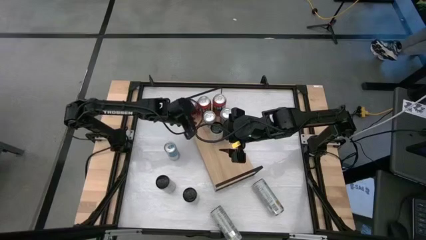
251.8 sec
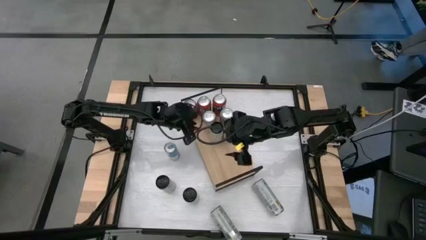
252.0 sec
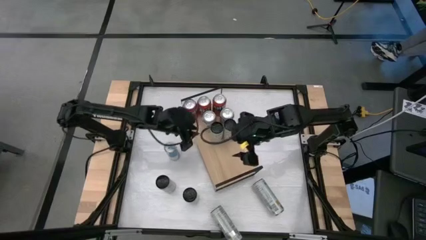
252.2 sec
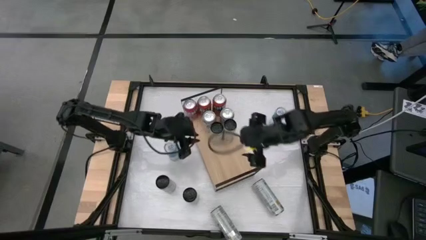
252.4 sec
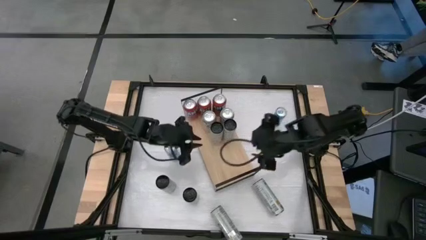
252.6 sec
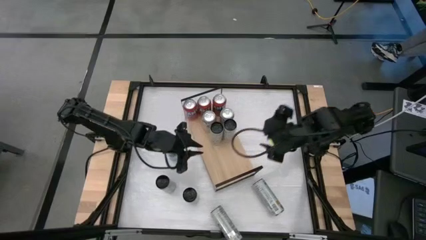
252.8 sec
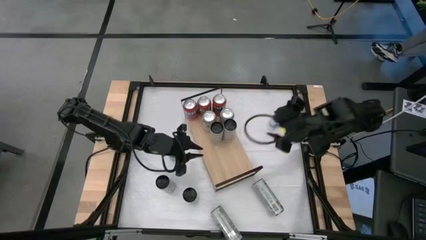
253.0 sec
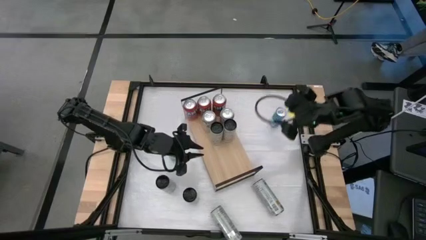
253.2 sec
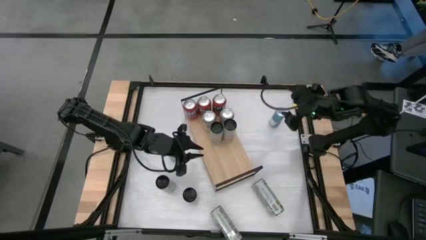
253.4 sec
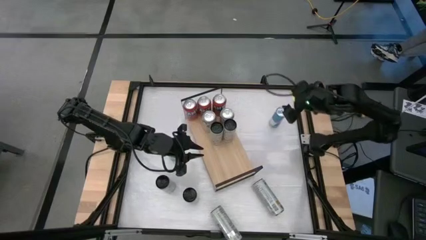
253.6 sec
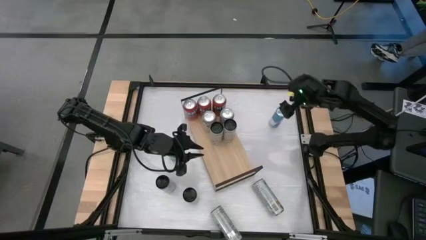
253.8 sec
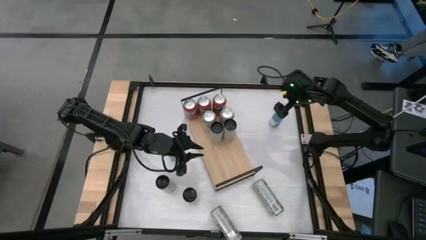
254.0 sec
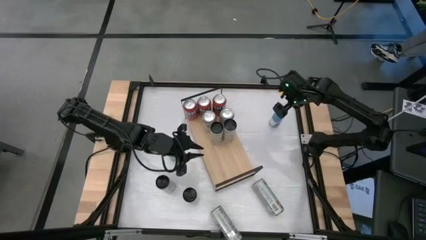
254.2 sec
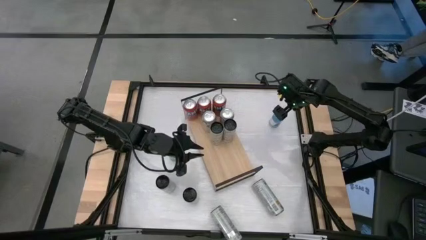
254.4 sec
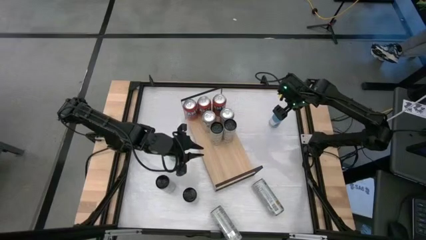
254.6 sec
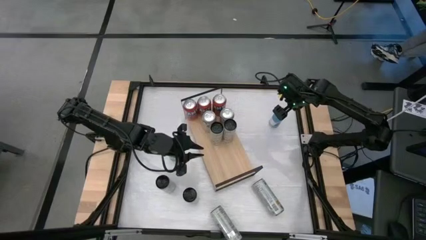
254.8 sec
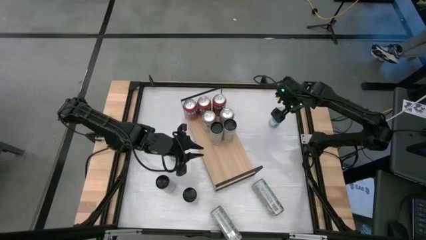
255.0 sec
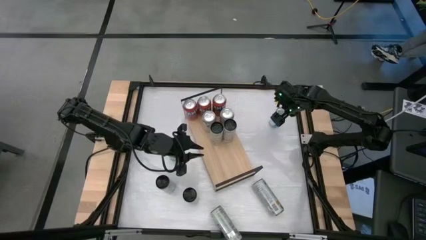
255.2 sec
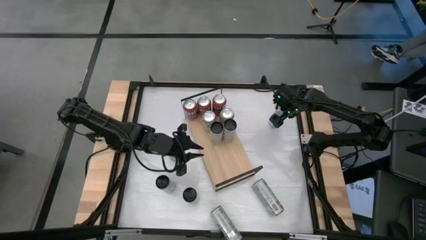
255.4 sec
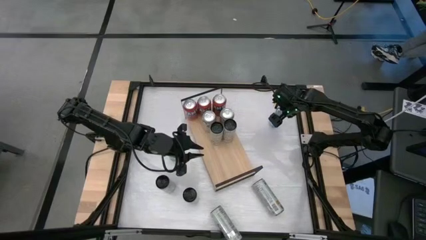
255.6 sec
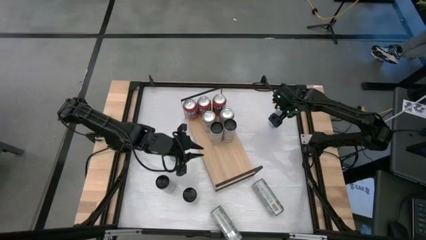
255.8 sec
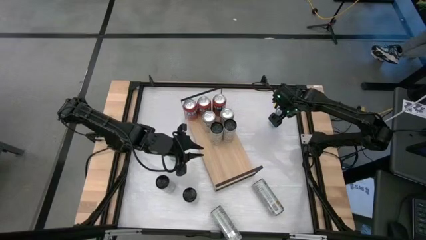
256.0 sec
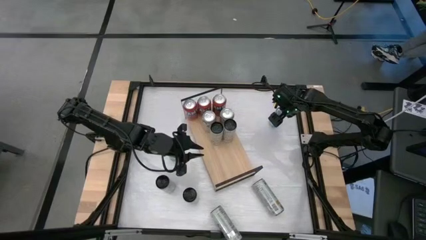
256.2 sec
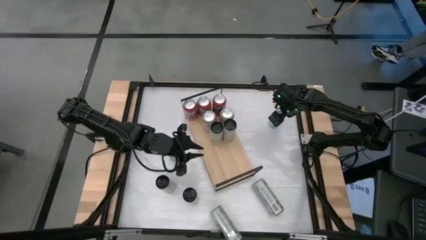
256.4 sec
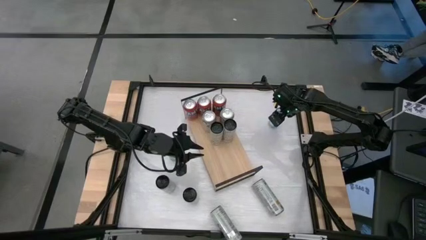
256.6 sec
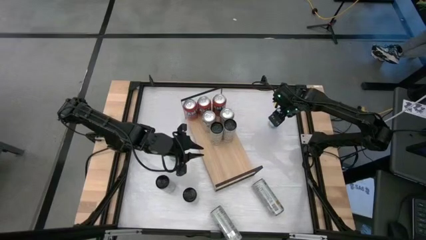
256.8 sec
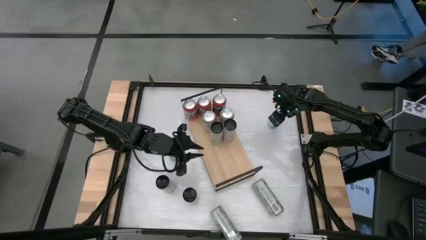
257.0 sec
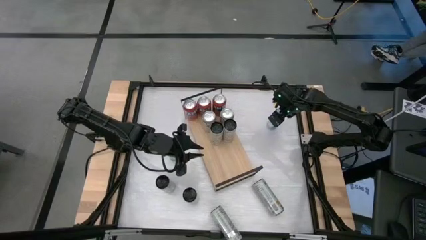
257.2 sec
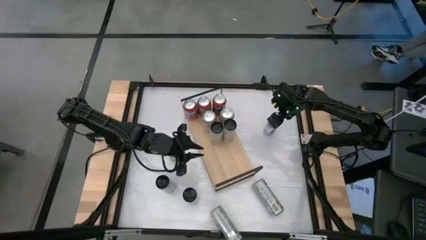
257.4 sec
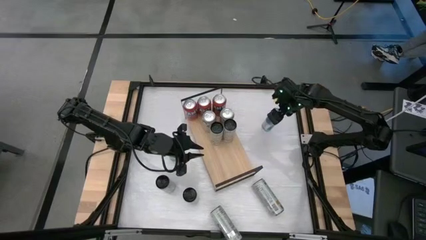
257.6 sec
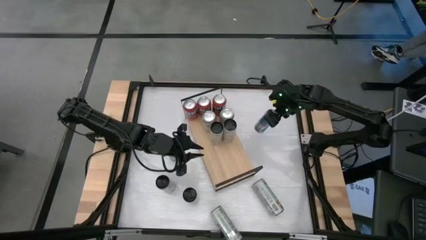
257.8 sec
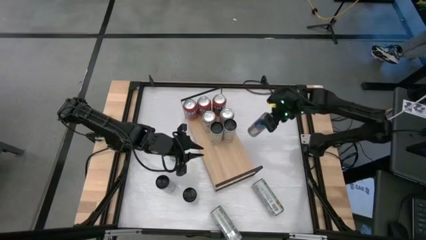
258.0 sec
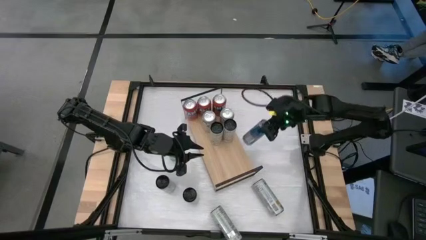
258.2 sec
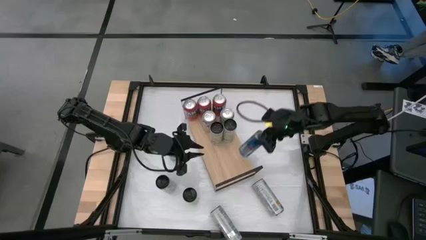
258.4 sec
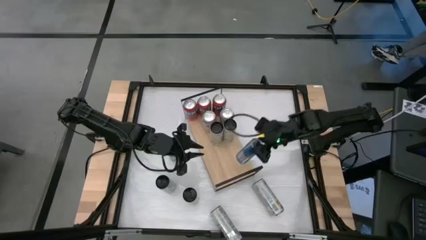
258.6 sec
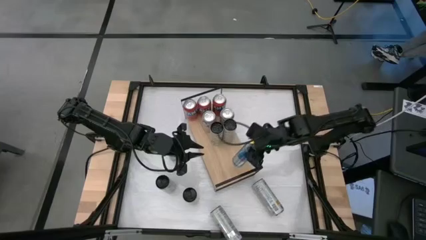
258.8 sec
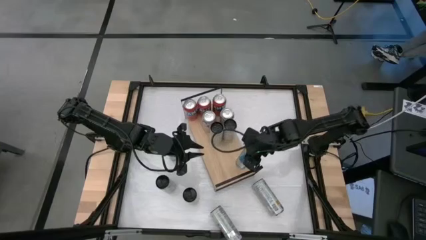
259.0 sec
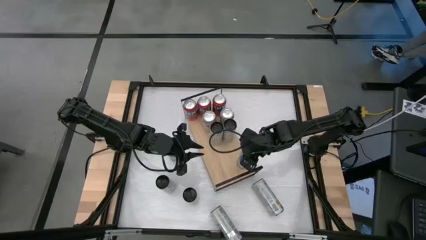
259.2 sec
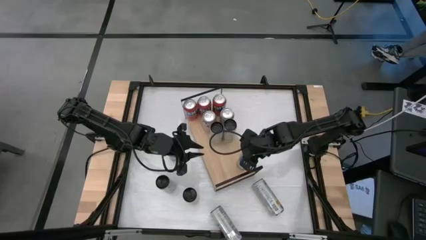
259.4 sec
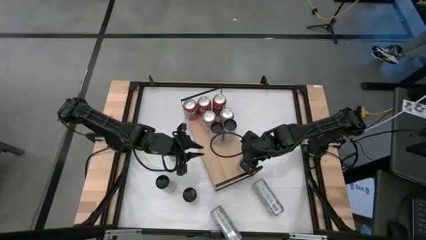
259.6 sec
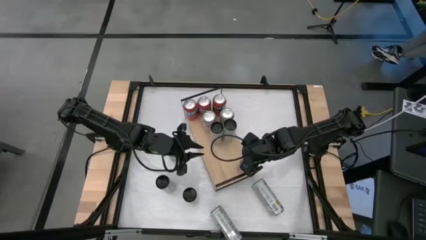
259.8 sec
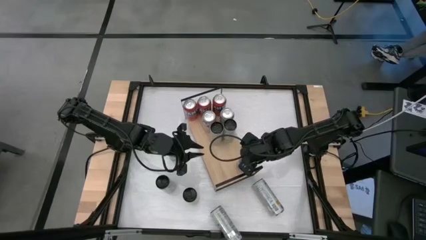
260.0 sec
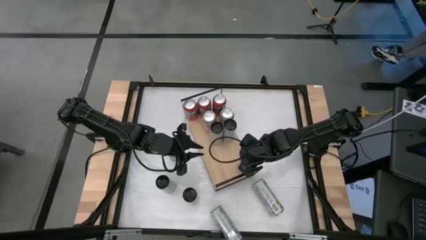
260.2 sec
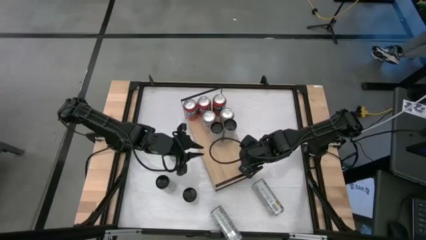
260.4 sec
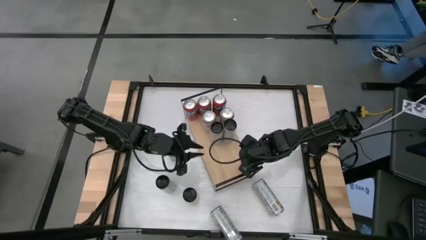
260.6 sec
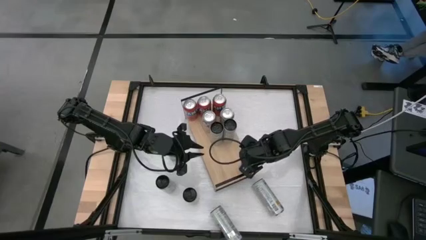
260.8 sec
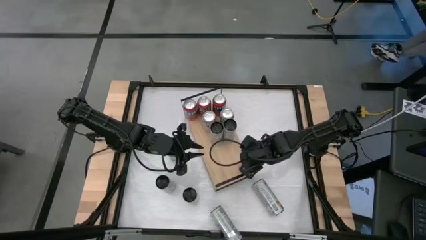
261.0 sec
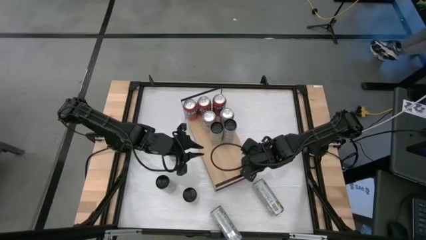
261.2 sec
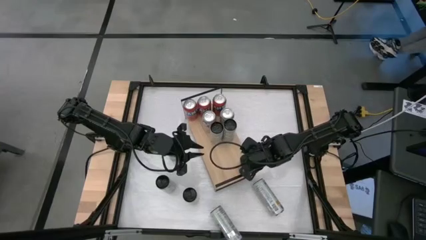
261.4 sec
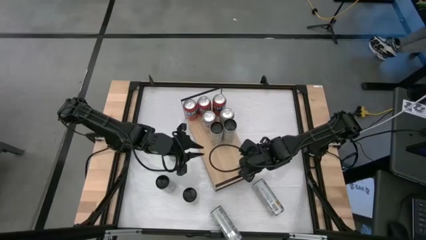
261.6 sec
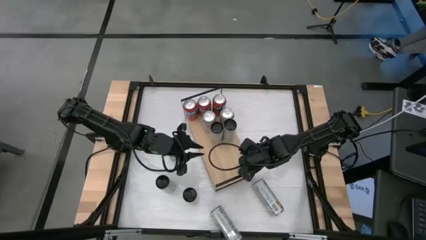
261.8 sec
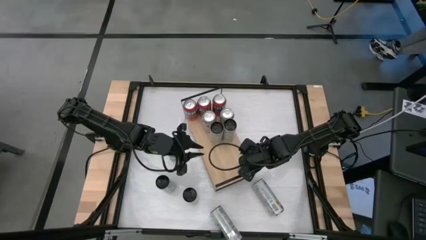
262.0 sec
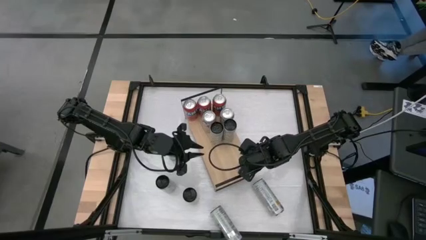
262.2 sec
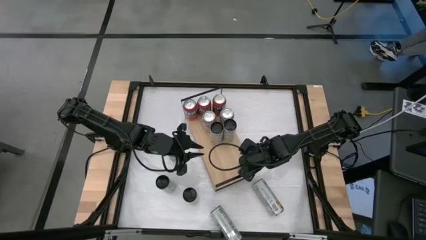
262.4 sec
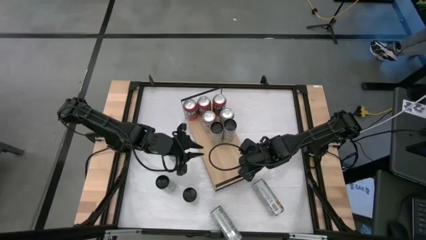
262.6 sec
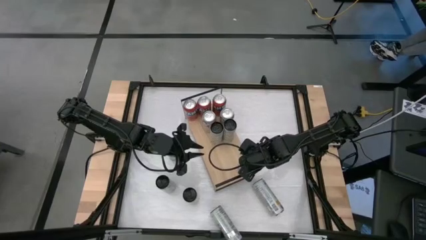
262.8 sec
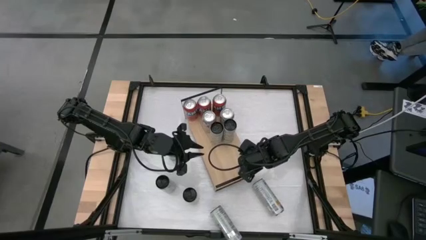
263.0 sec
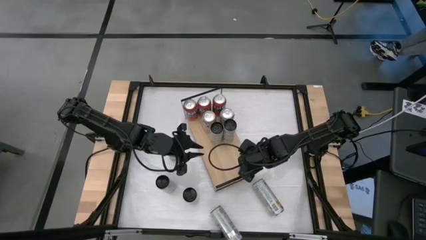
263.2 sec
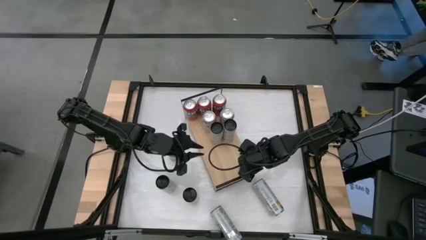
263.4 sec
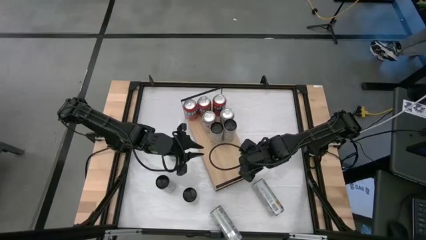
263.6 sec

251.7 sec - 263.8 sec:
Task: Place canned beverage on shelf
Put the top blue soda can on the shelf

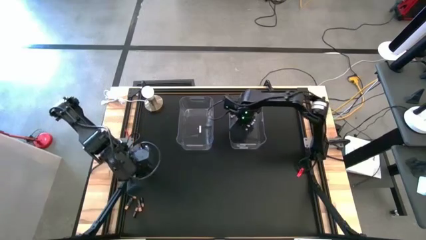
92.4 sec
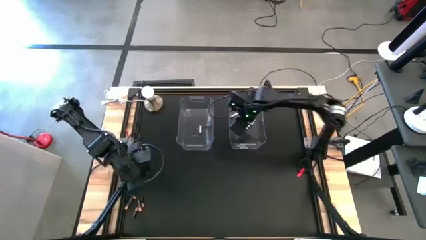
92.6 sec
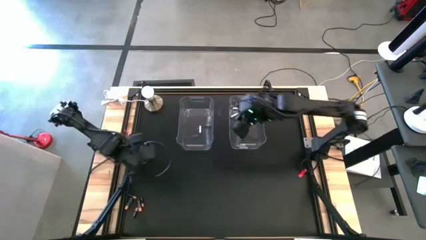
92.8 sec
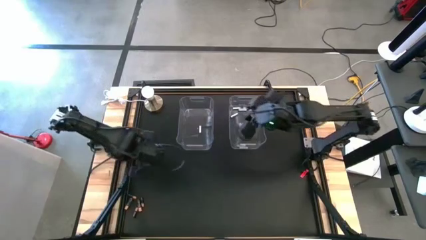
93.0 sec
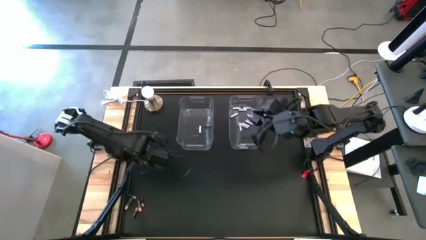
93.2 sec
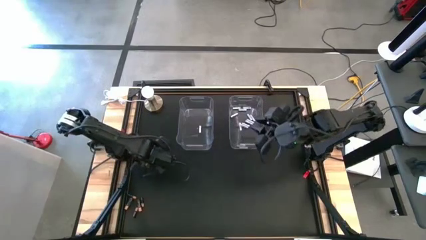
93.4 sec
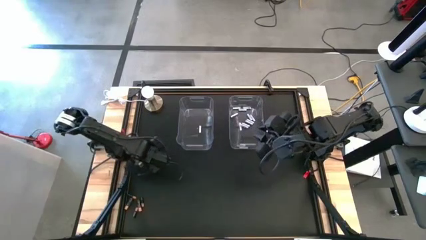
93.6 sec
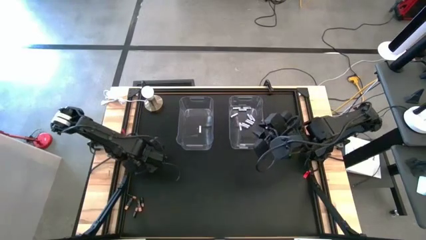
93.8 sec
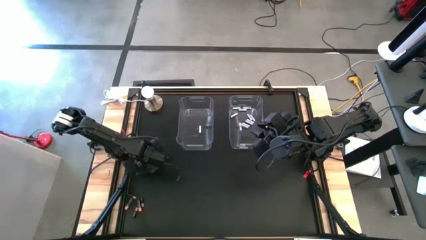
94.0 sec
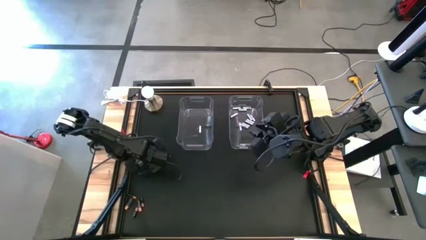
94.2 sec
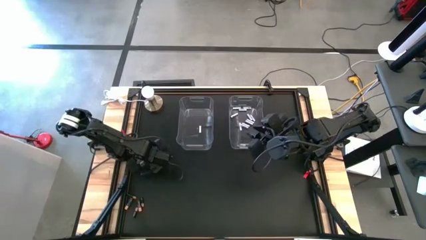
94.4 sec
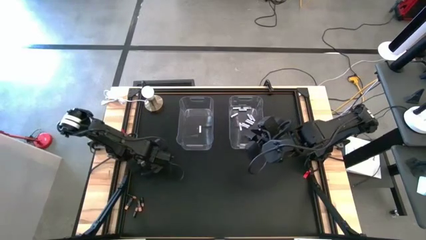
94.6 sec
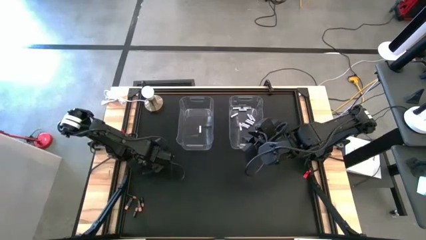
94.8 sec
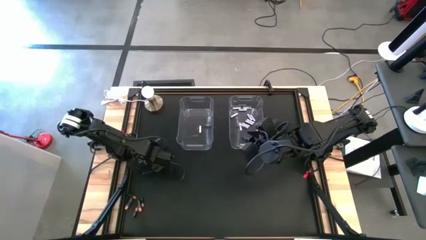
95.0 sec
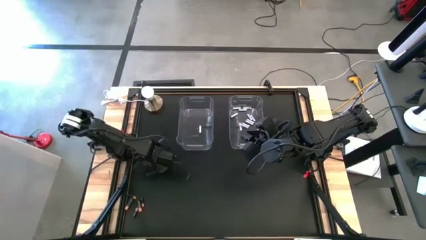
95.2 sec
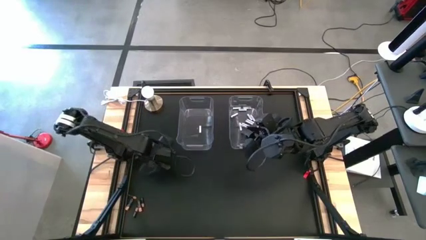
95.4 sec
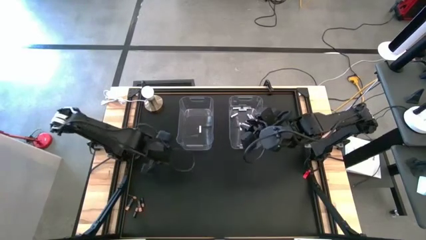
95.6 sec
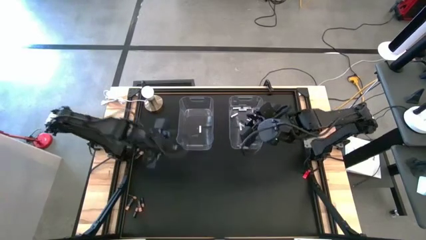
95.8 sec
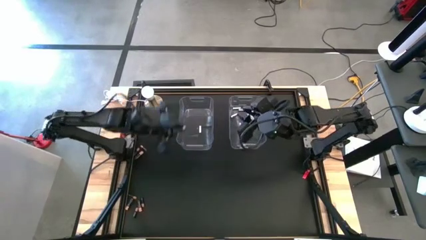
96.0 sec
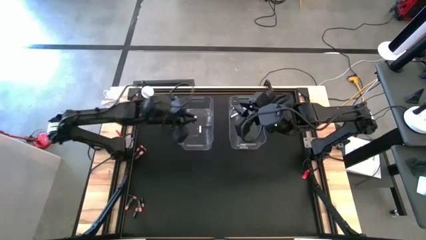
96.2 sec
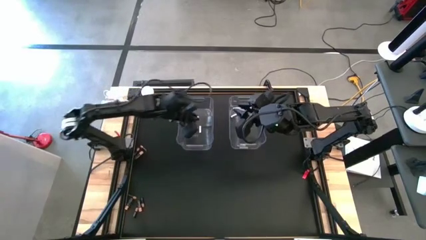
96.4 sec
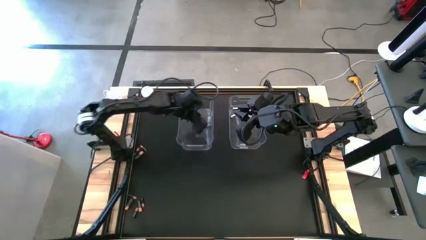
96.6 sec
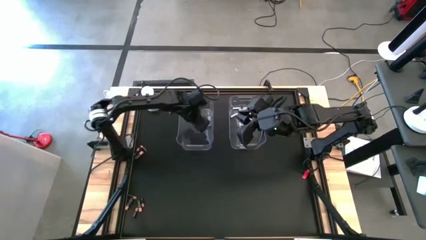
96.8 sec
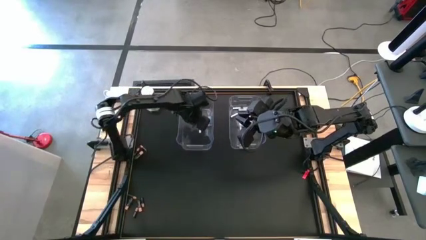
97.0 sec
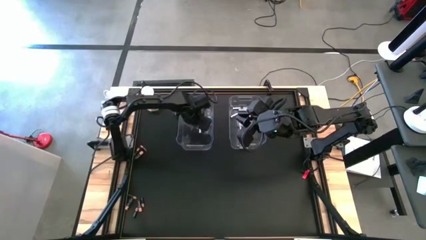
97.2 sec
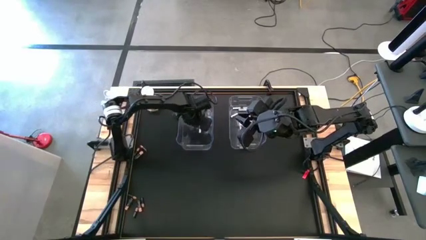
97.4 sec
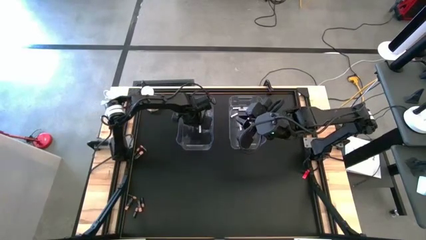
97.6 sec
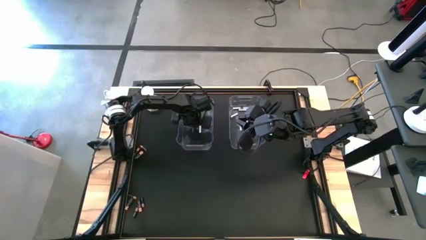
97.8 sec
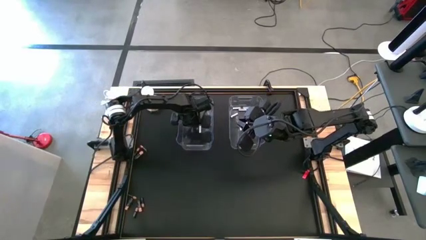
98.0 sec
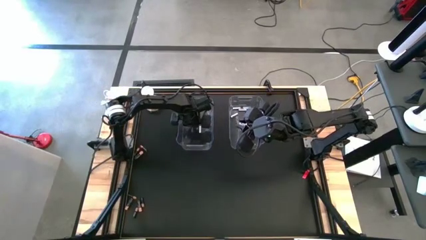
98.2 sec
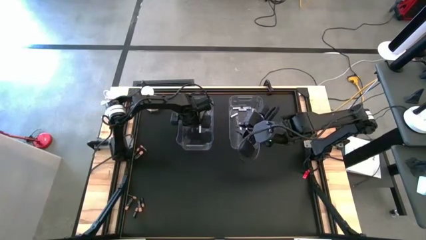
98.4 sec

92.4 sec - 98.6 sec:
Task: Sort batteries
Put the black battery into the left transparent bin
